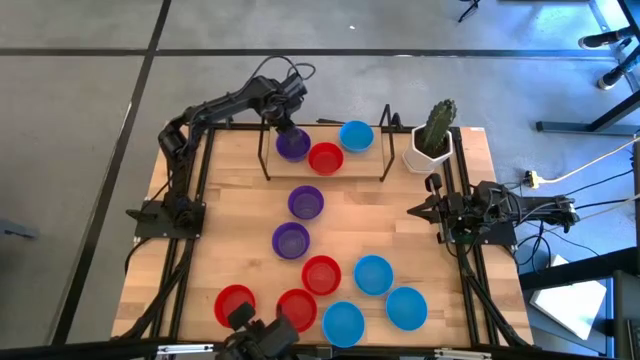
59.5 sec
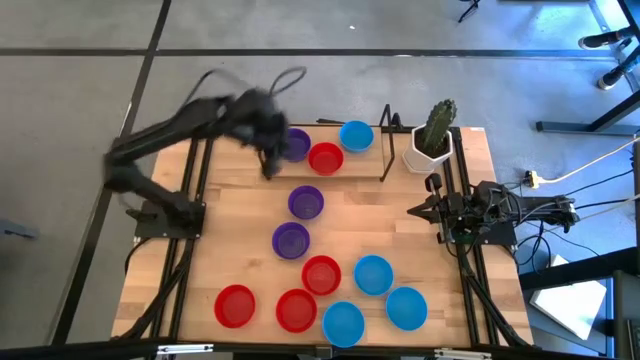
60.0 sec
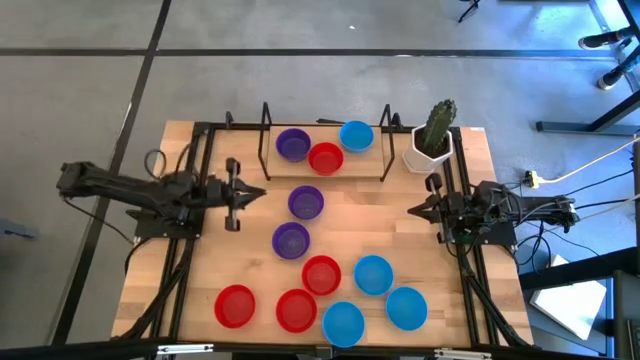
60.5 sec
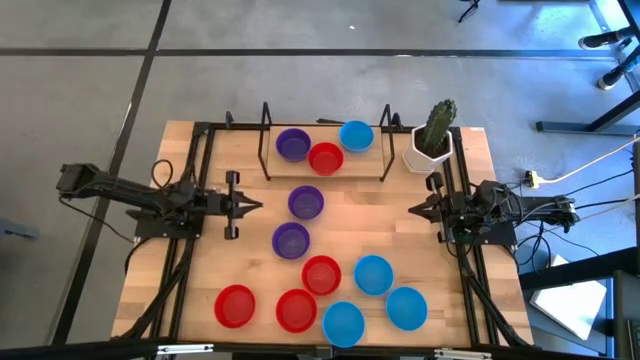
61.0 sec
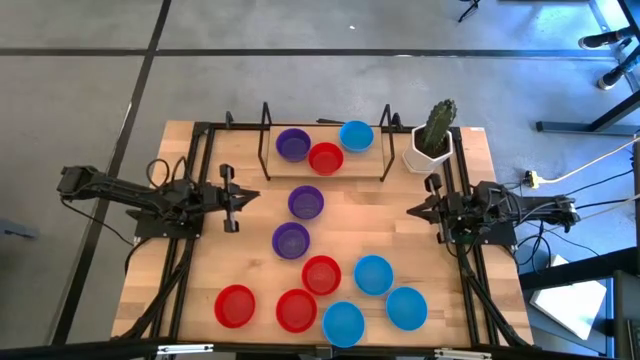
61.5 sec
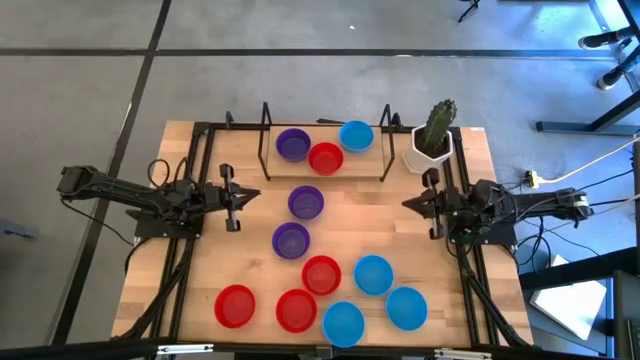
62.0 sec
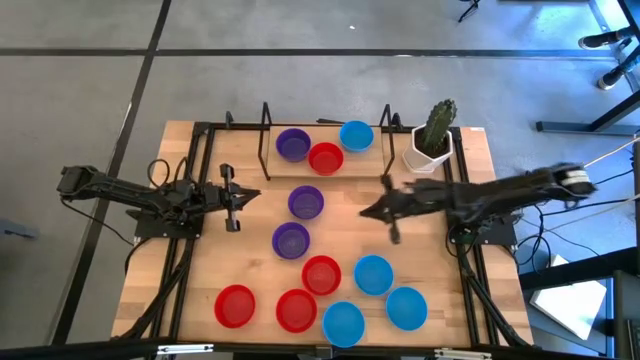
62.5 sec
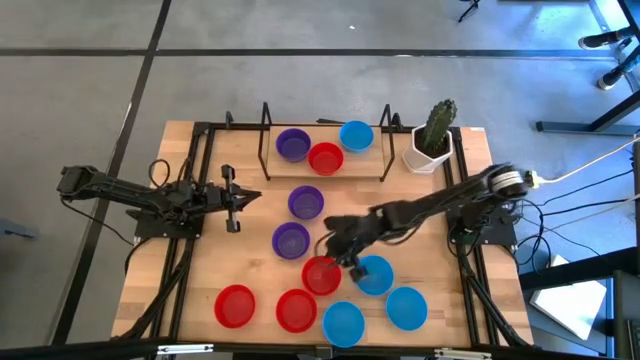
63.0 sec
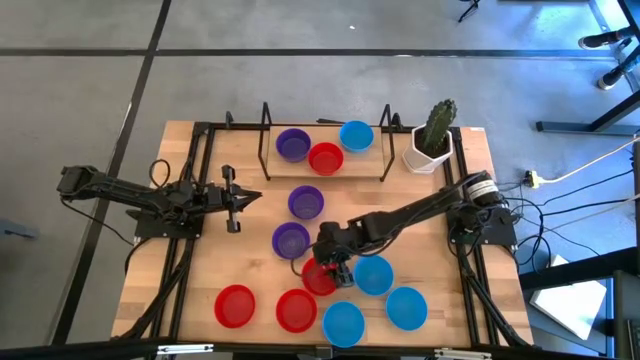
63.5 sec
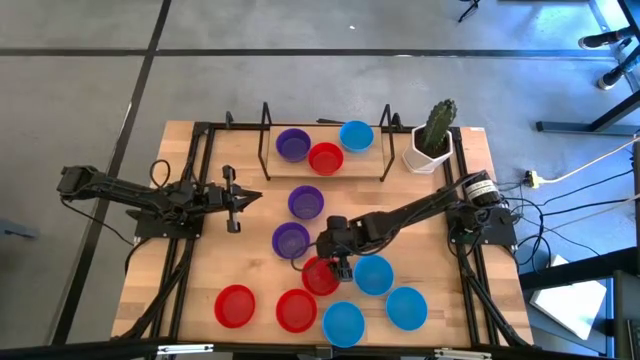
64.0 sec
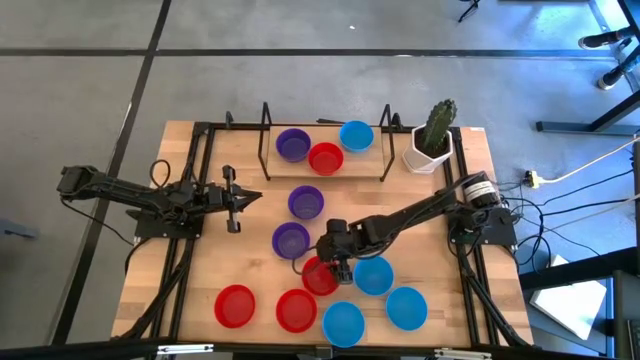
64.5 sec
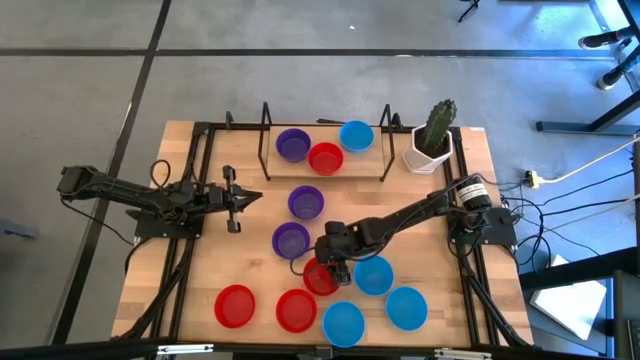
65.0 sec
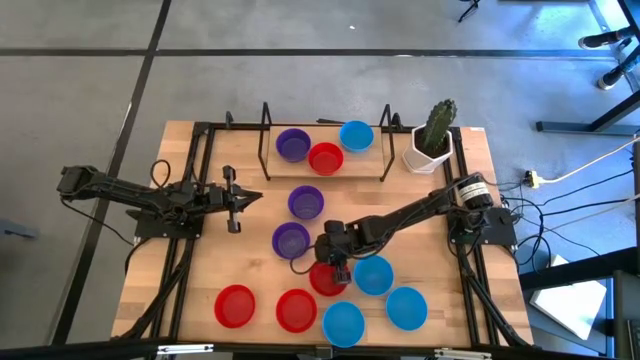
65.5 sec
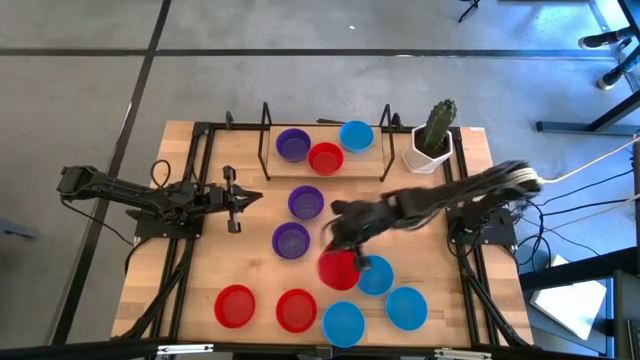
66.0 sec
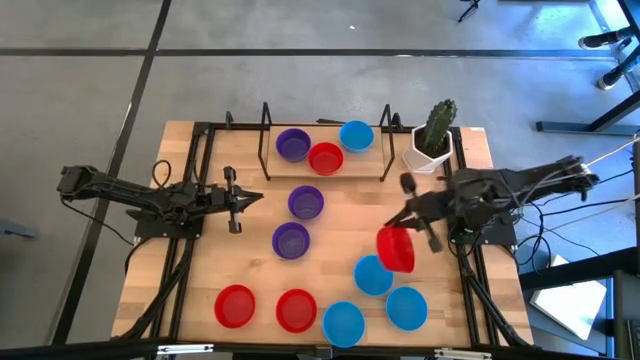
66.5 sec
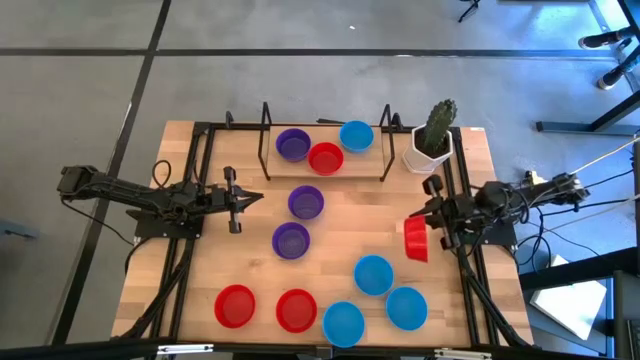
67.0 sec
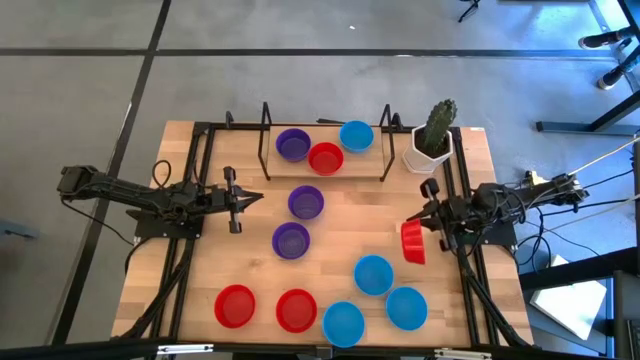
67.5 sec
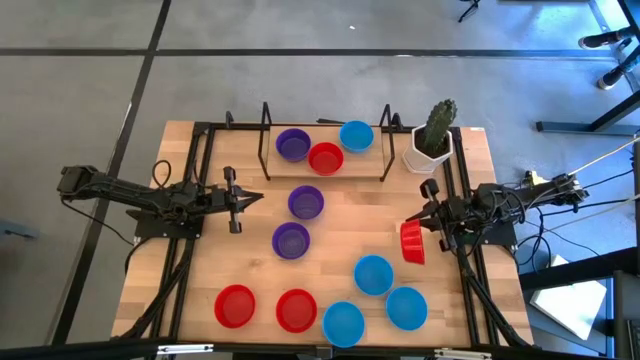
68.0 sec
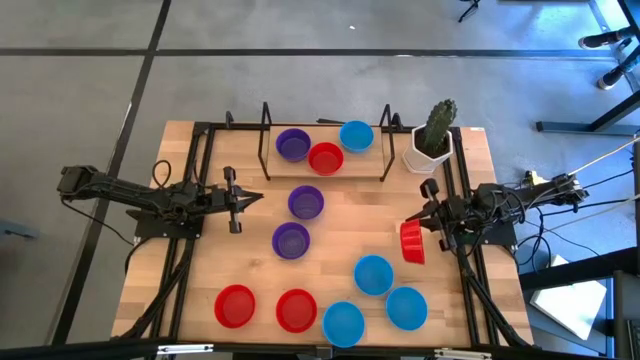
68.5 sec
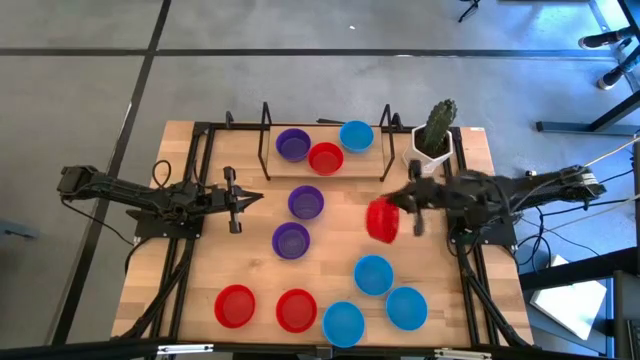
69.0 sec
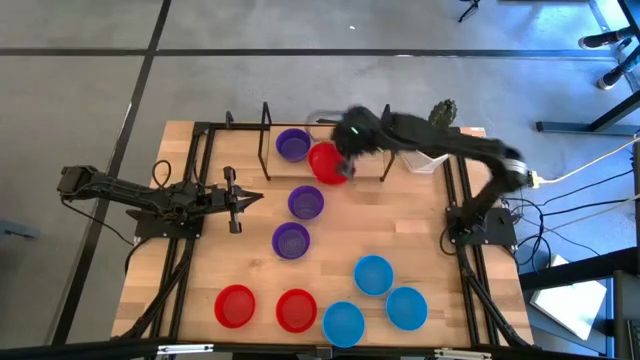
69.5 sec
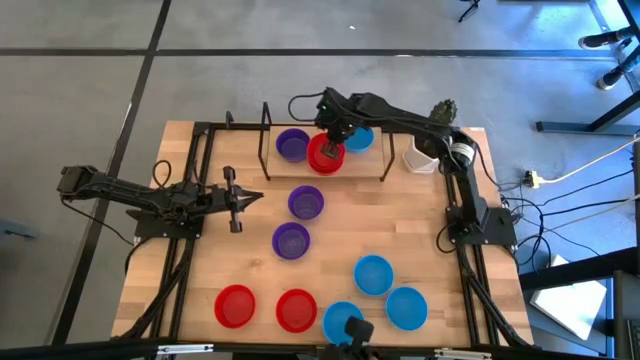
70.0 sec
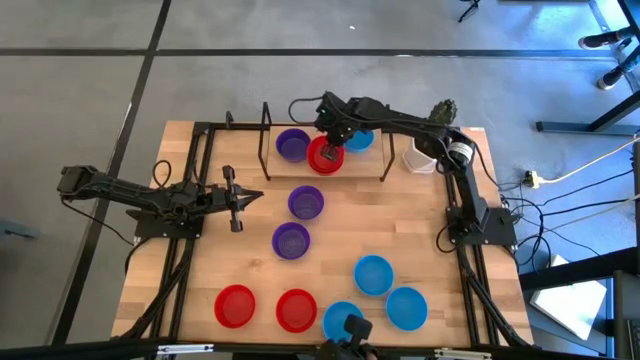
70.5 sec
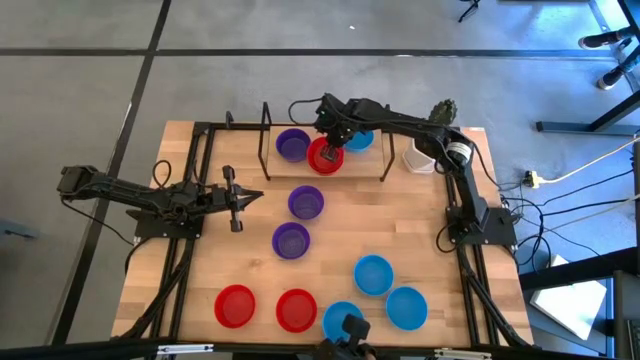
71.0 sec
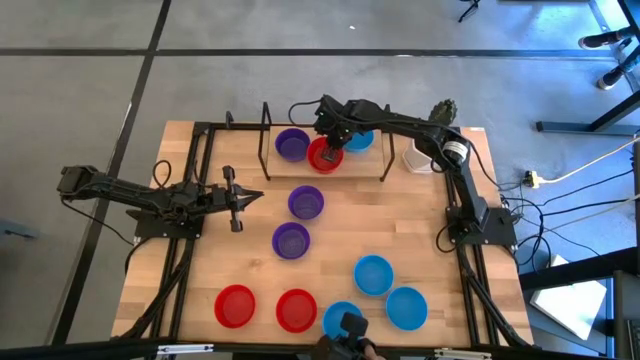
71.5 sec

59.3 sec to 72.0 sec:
Task: Pick & Place Mini bowls
Stack the red bowl on top of the red bowl on the shelf

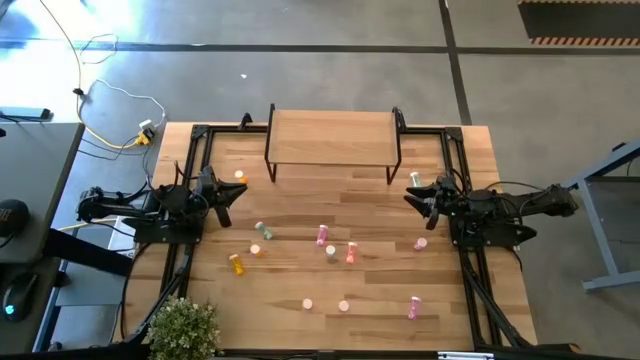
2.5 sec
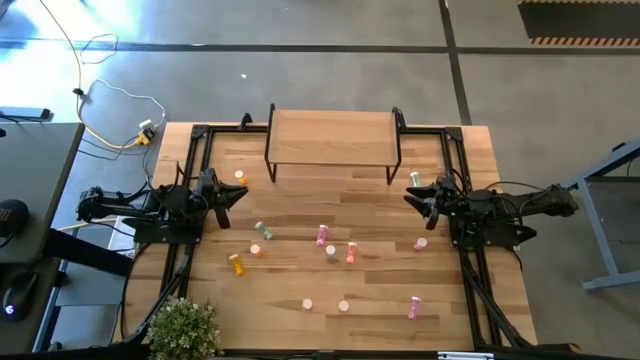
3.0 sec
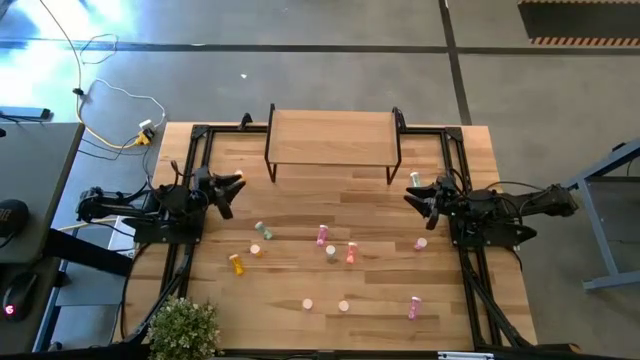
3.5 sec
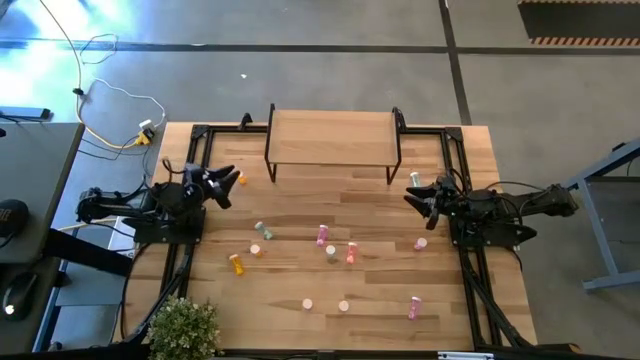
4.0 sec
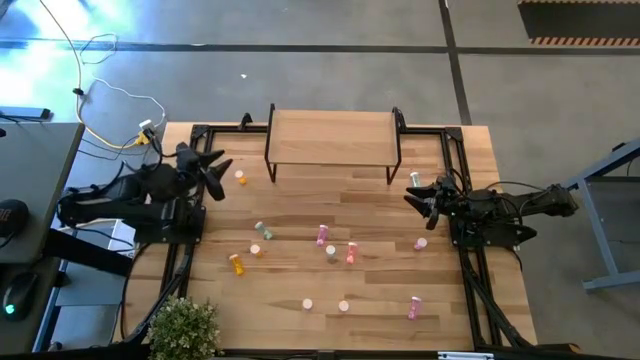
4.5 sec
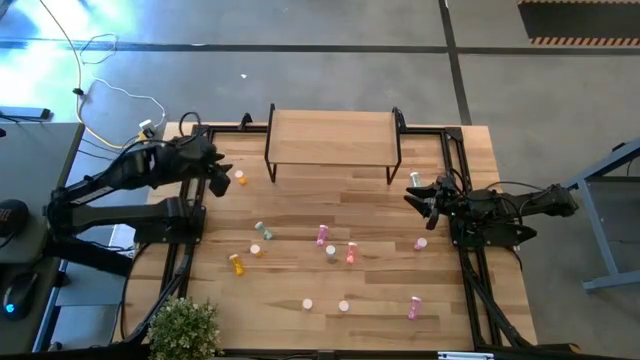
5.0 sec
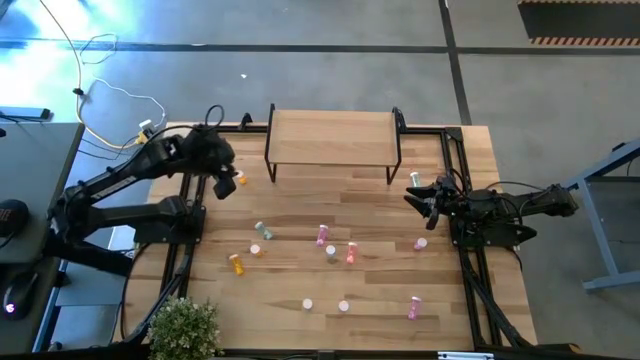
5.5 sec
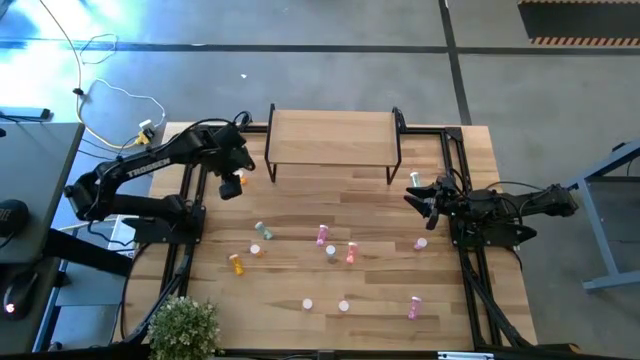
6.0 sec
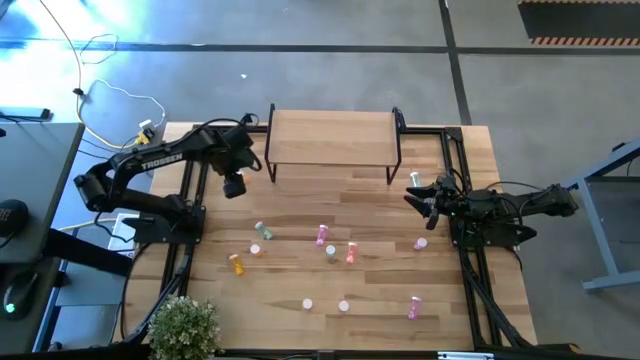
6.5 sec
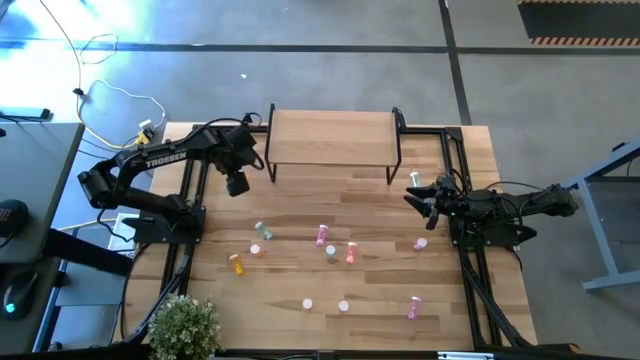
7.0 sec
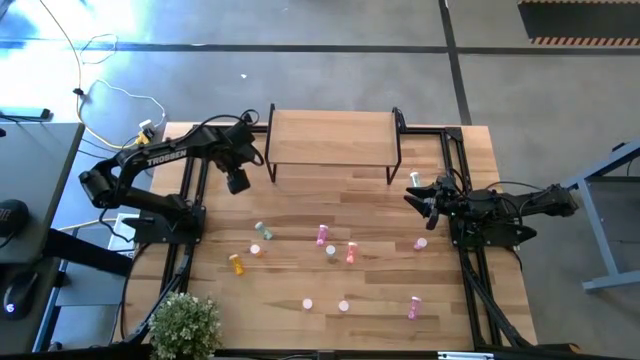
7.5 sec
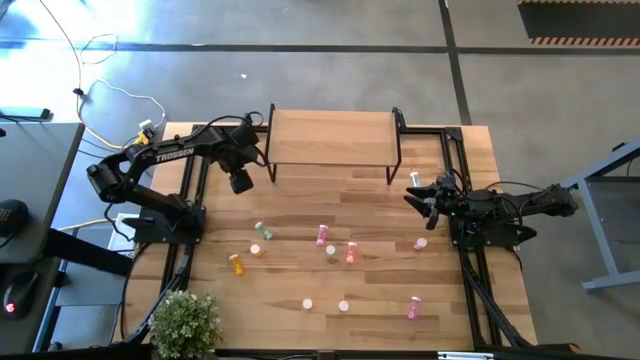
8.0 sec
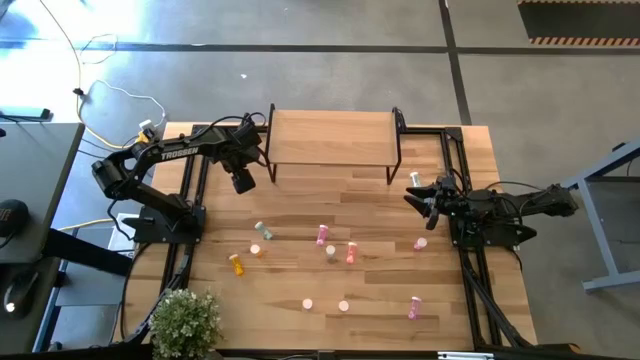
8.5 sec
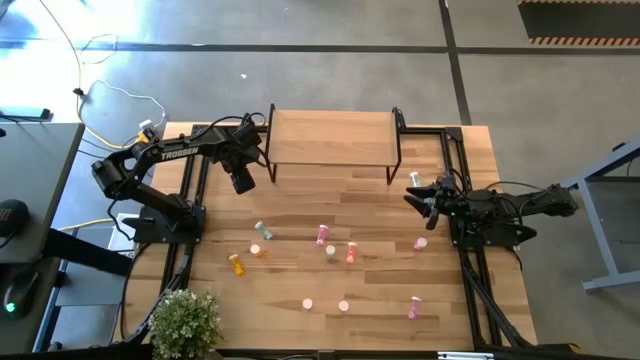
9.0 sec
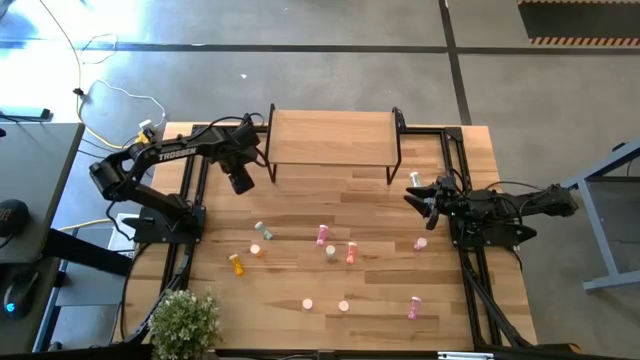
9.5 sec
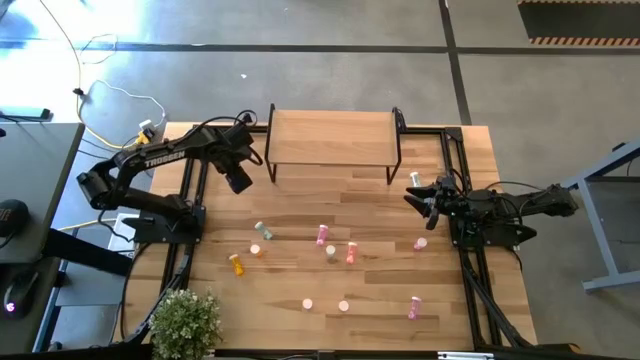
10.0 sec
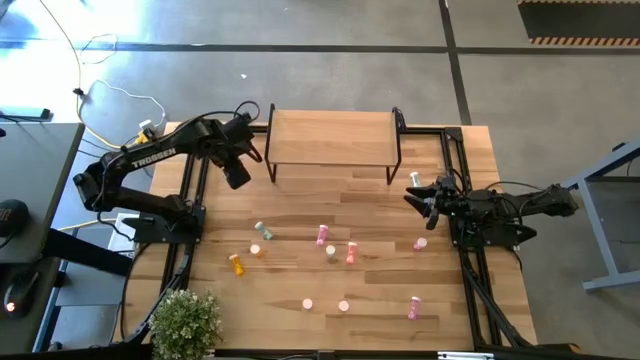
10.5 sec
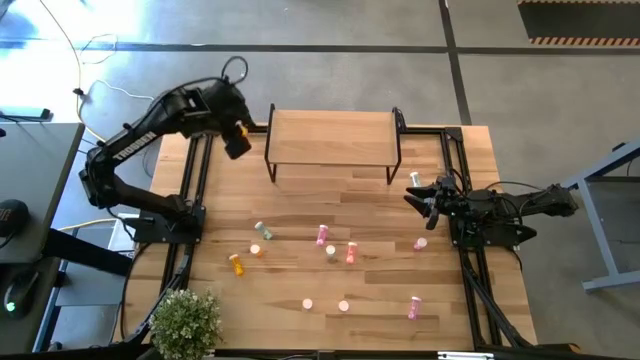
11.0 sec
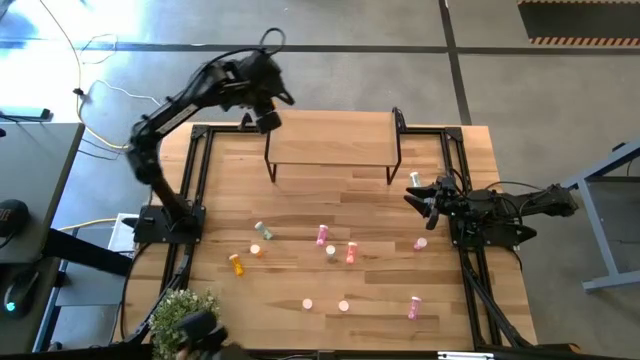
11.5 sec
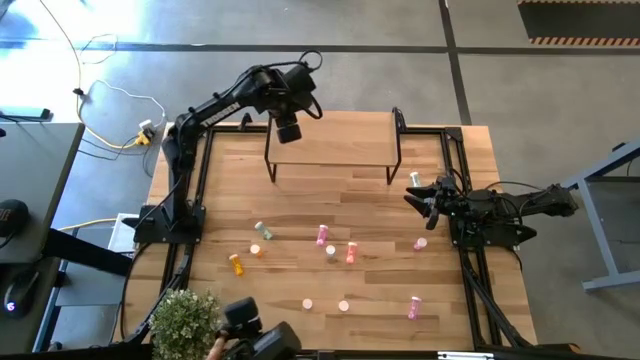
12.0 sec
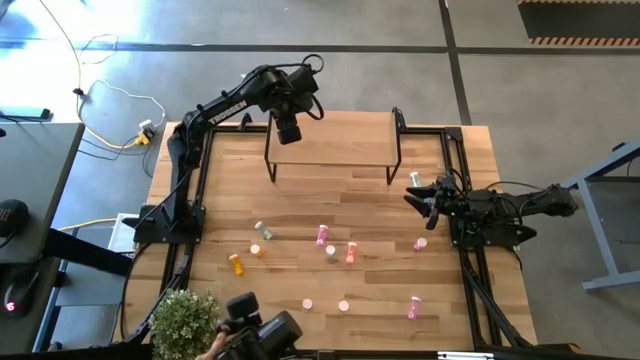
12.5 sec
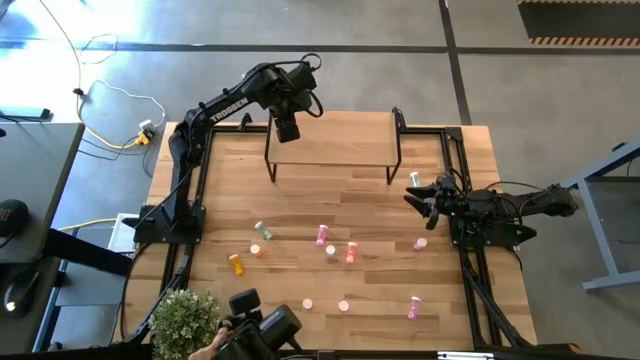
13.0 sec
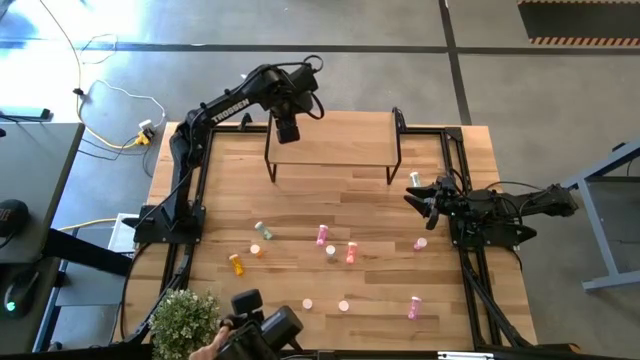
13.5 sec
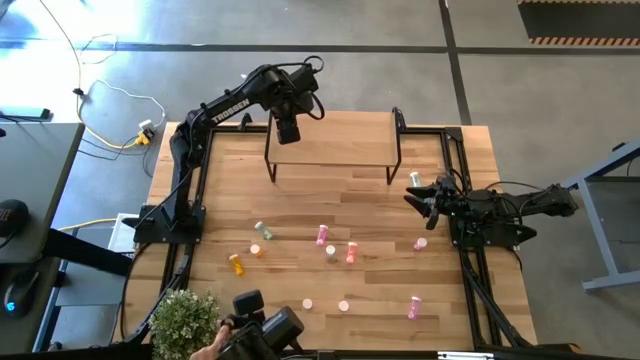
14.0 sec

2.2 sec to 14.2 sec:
Task: Pick and place medicine bottles onto shelf by color
Put the top orange pill bottle on the shelf
